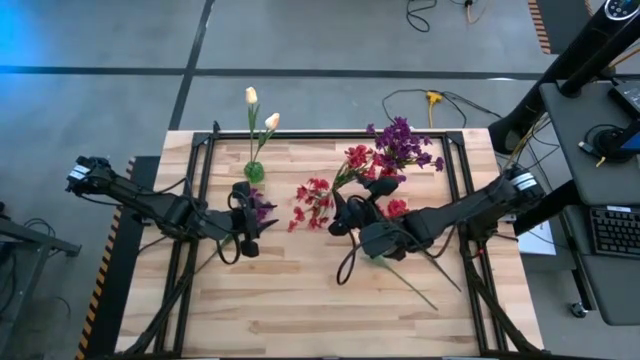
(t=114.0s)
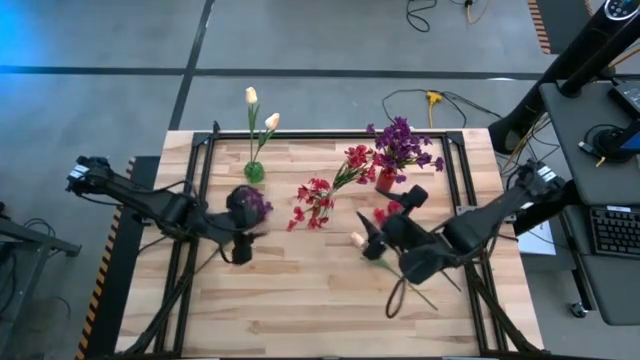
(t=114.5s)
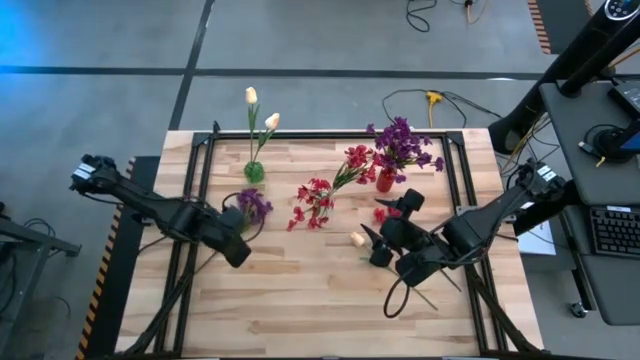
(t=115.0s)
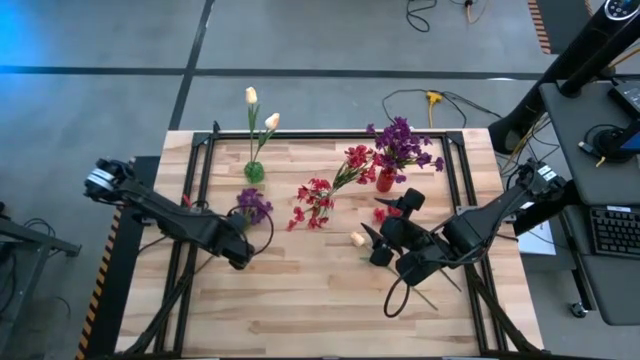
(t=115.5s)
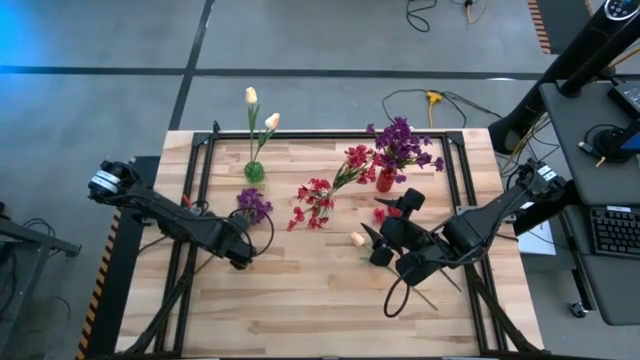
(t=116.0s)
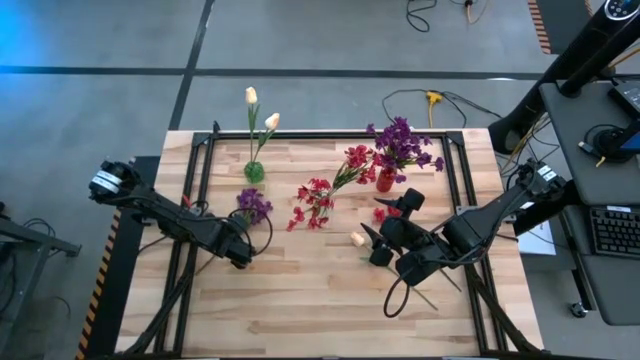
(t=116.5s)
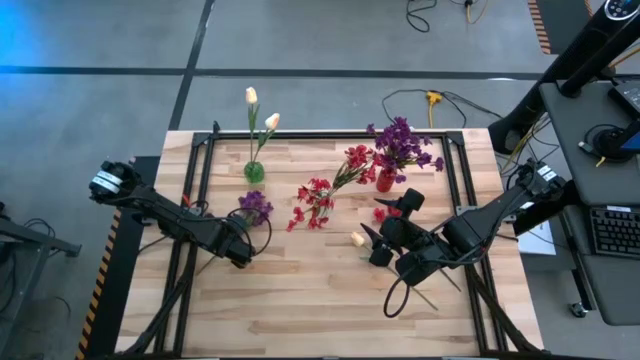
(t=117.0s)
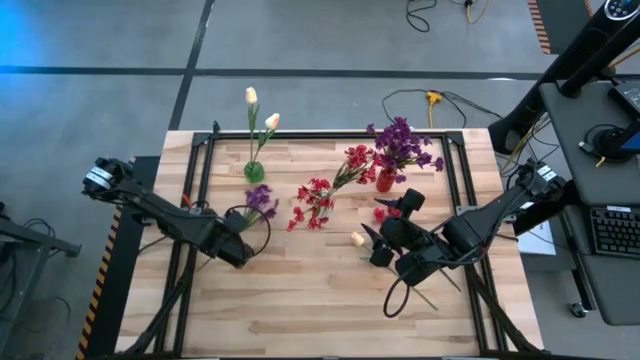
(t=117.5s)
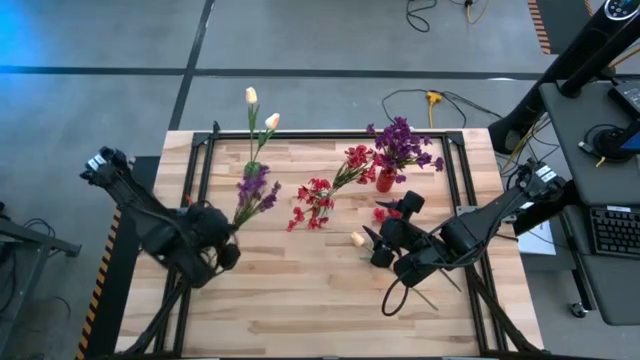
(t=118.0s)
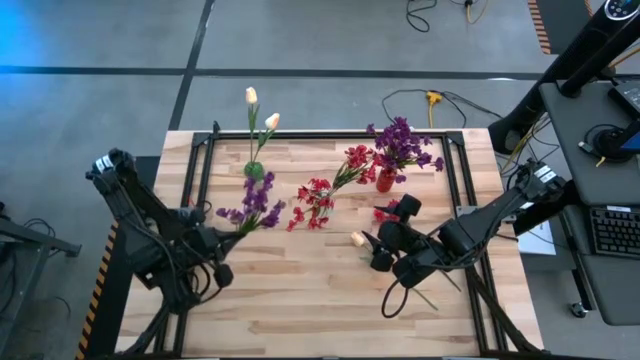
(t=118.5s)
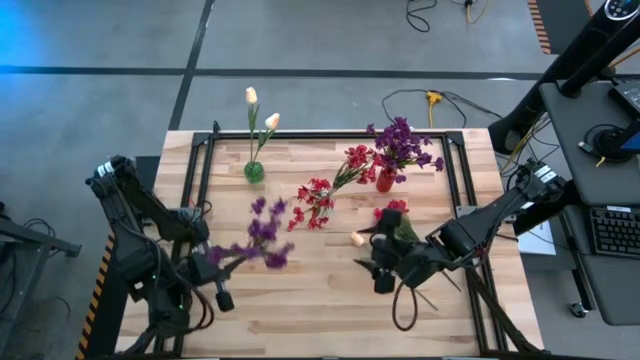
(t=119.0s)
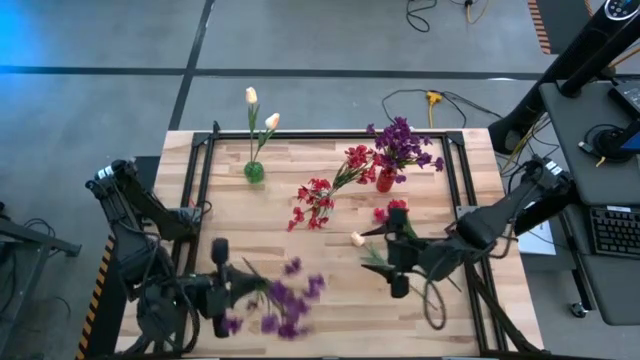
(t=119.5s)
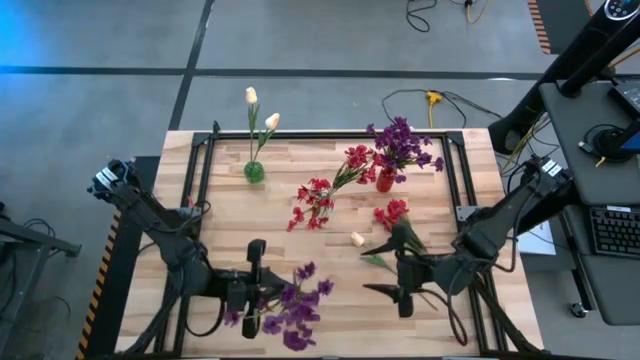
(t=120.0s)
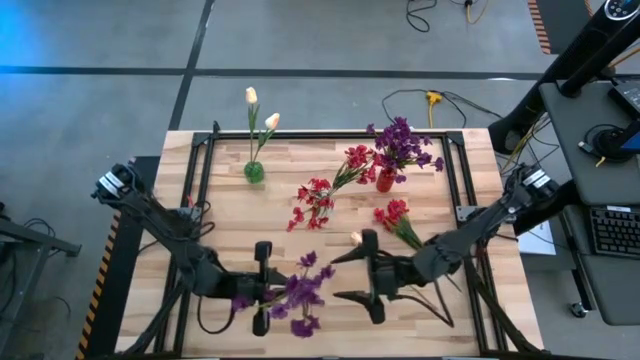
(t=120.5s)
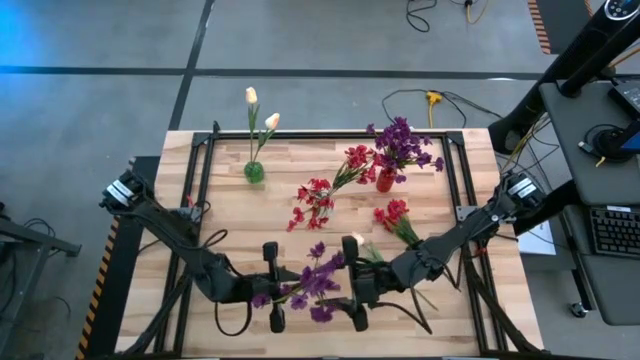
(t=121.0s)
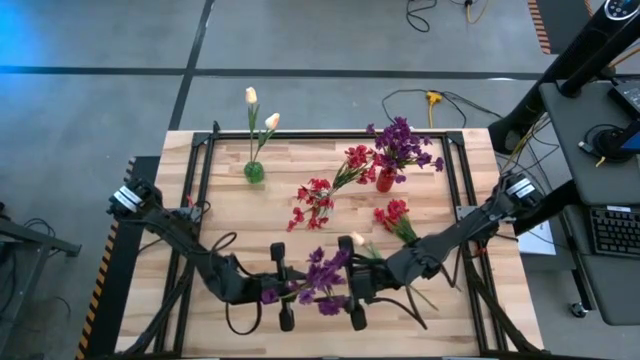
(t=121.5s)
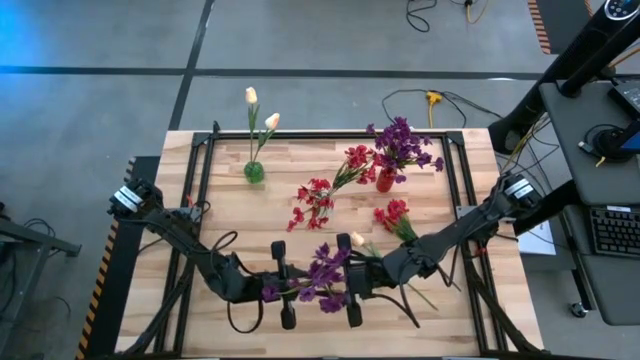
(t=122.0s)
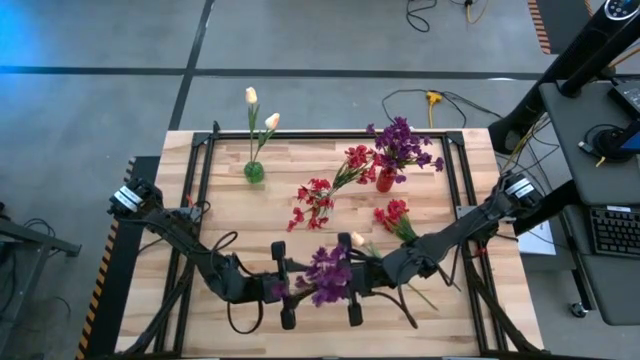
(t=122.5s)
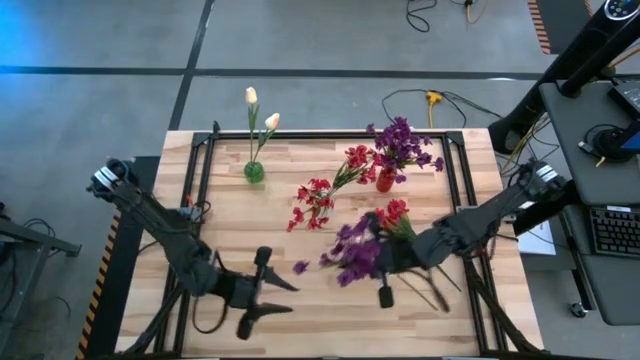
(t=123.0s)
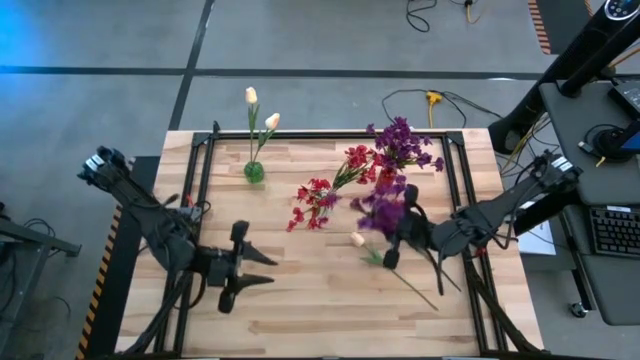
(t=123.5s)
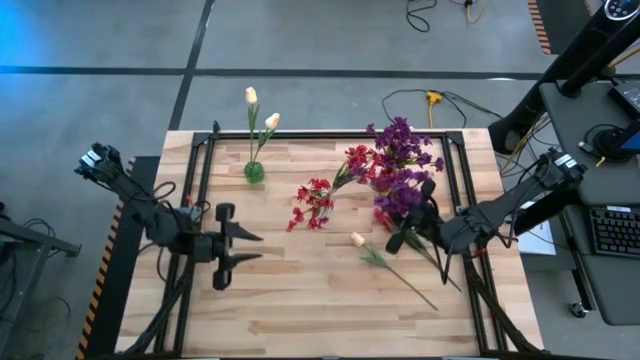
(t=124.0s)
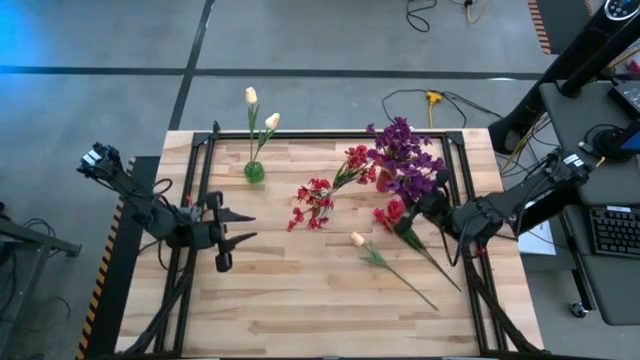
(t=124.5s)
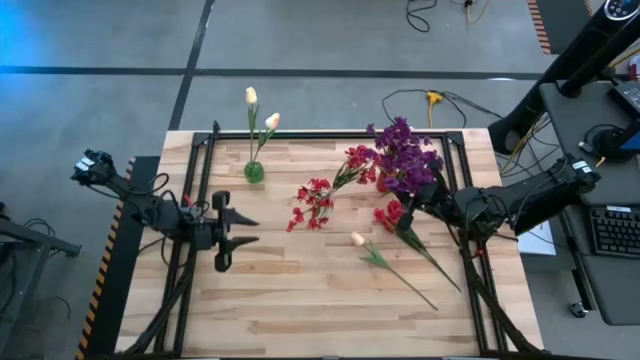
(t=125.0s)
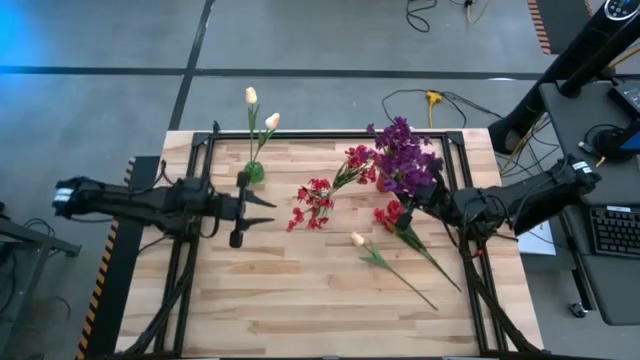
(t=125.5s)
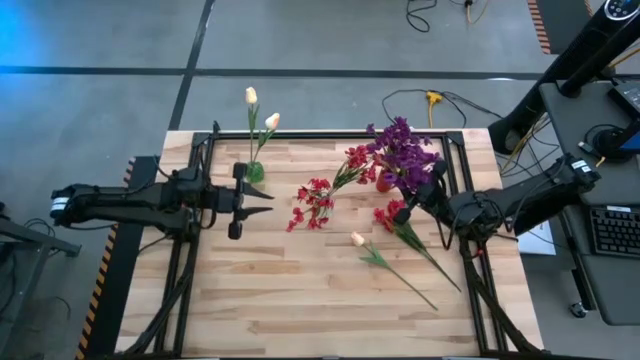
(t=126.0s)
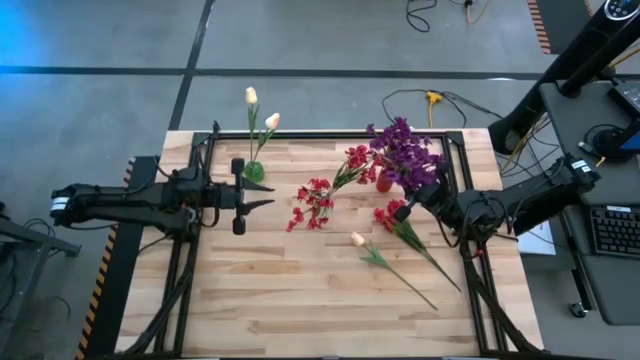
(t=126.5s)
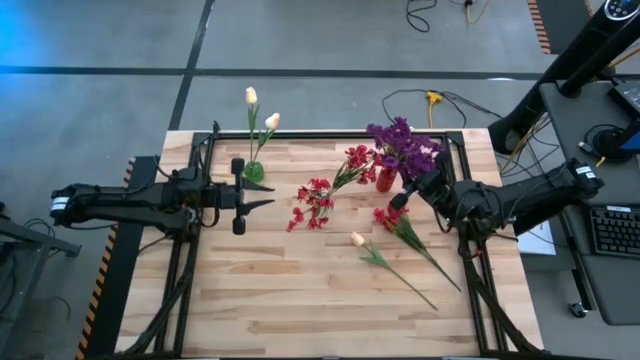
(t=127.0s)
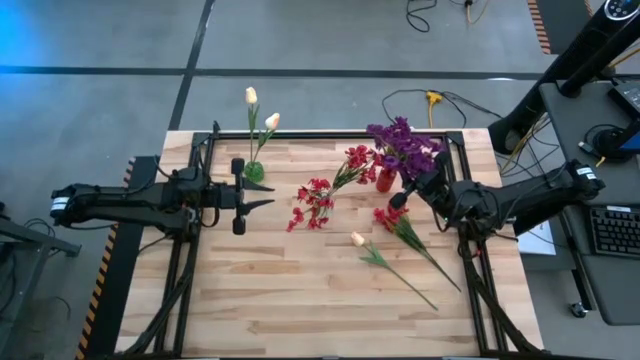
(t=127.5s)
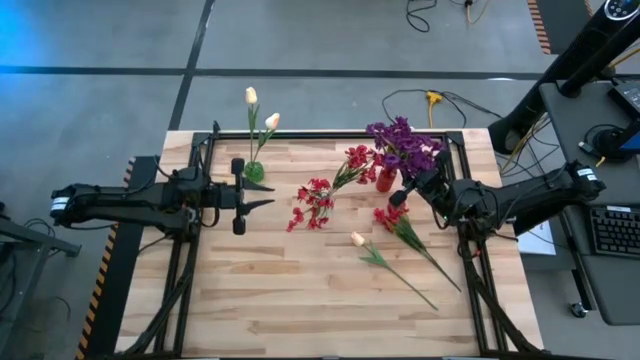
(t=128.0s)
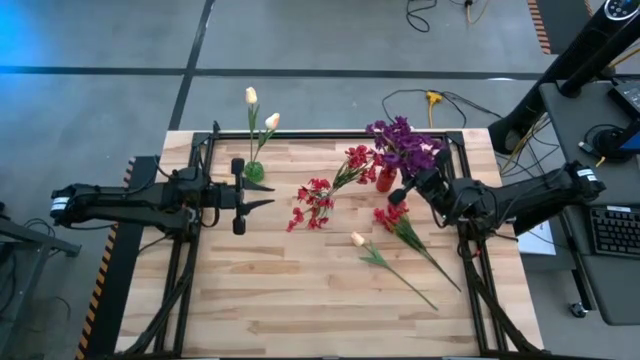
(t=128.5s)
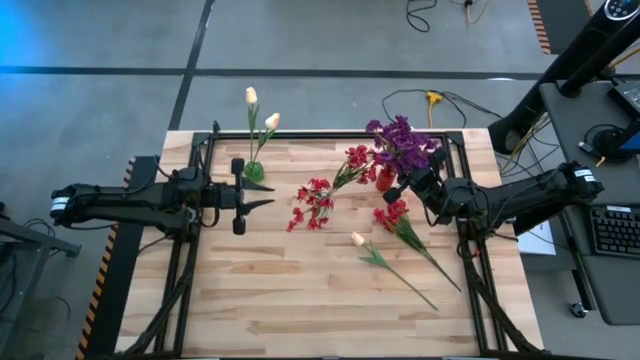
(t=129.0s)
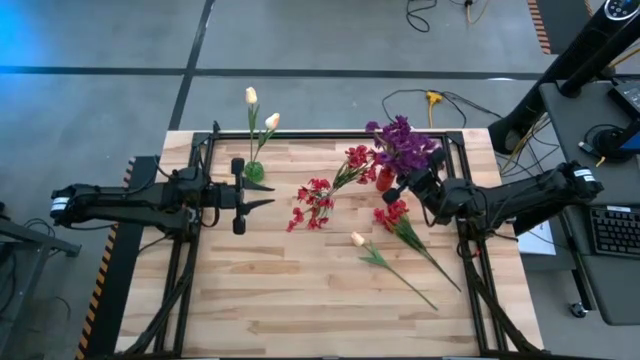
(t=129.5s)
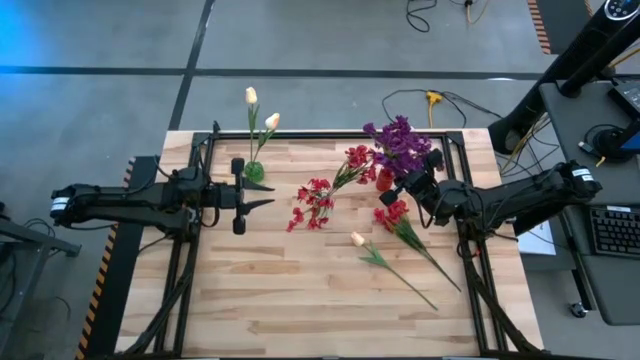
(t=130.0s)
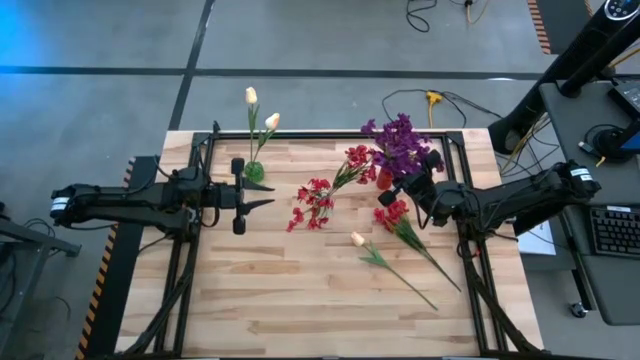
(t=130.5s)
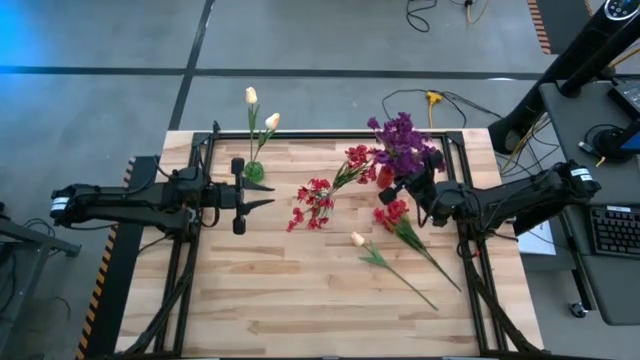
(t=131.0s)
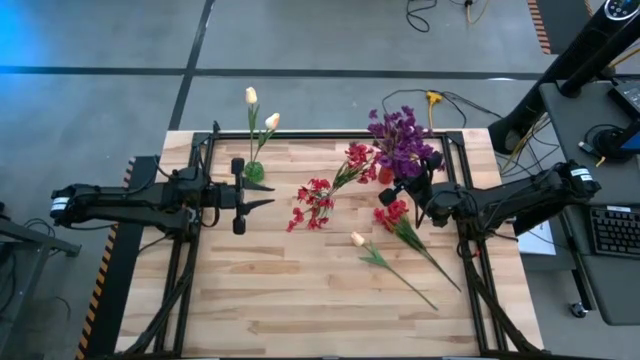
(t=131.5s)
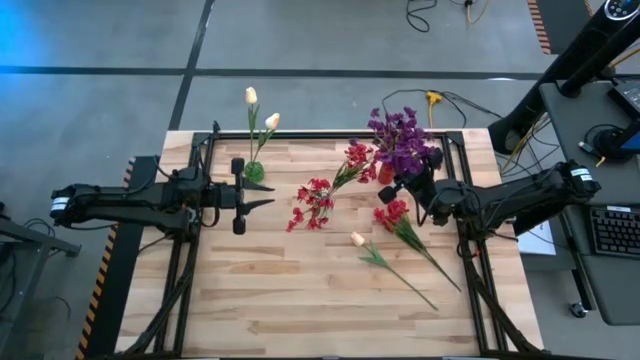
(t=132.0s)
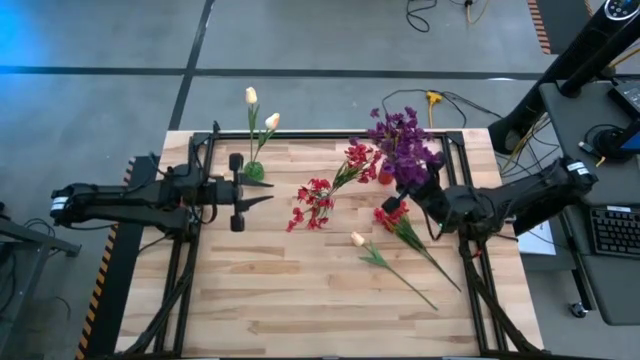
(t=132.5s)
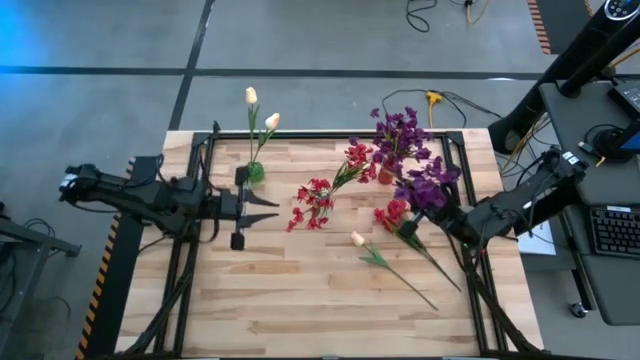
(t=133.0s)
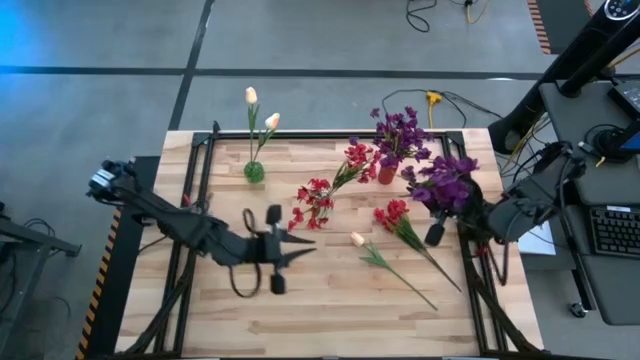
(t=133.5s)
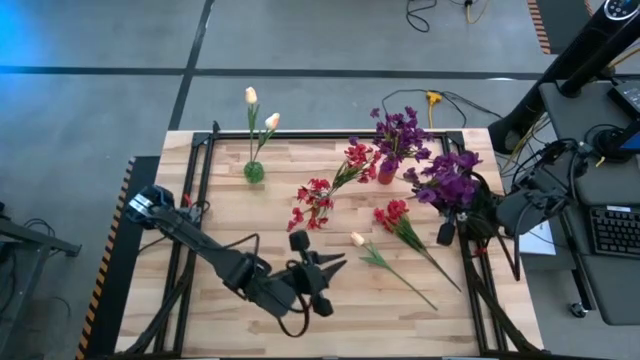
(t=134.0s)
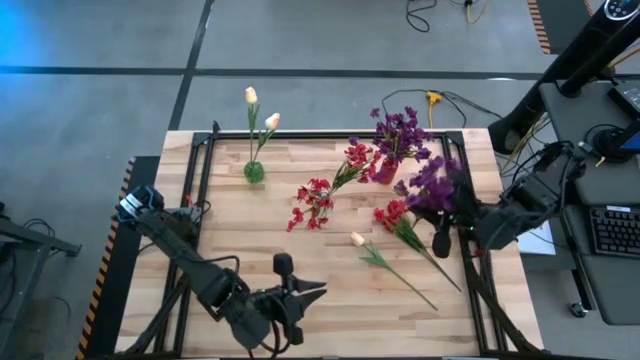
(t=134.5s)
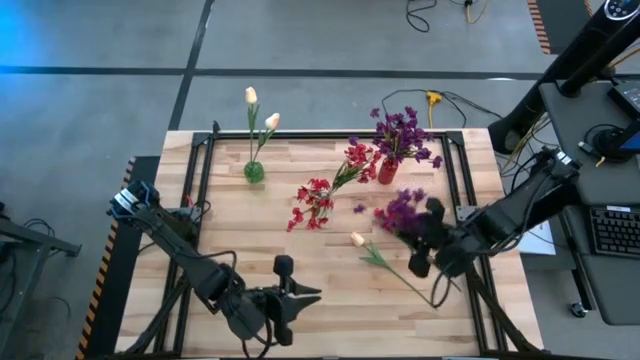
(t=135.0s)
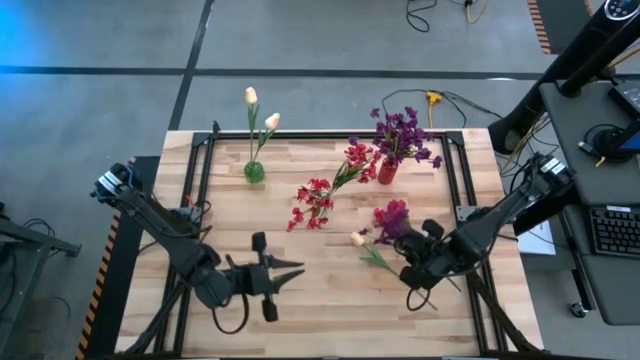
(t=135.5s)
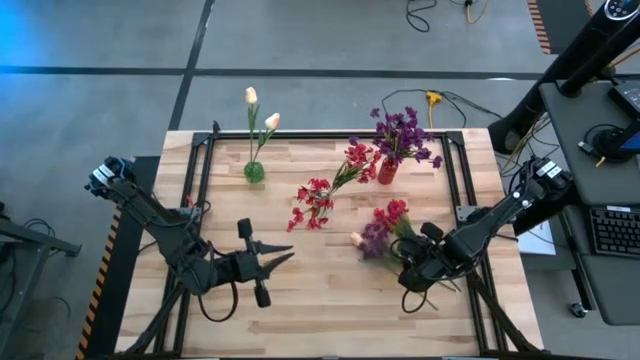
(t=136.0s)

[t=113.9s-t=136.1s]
Task: Sort flowers into vase by color
Put the violet flowers into the red vase
